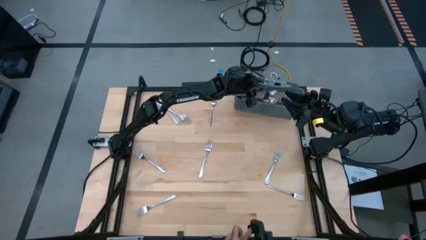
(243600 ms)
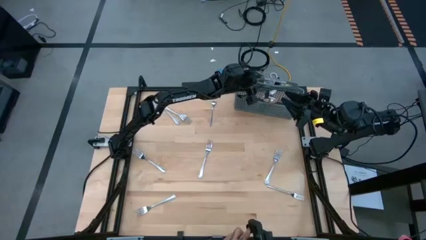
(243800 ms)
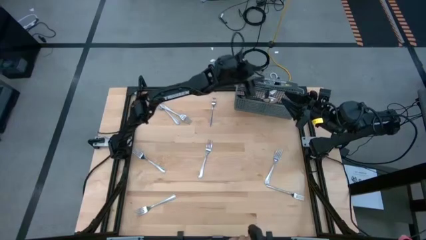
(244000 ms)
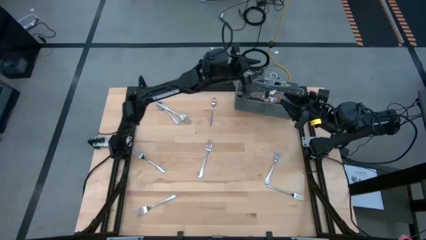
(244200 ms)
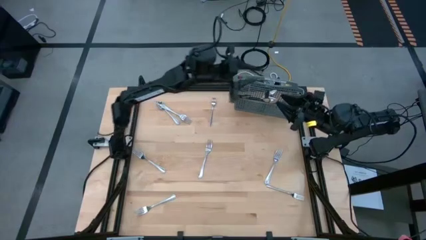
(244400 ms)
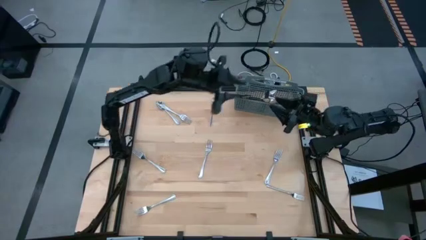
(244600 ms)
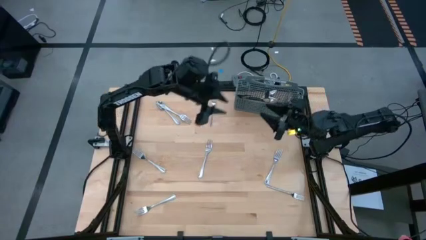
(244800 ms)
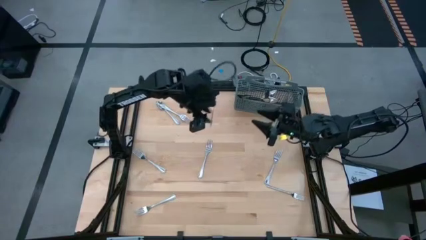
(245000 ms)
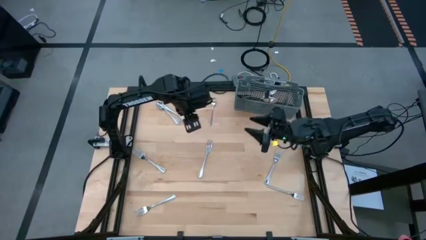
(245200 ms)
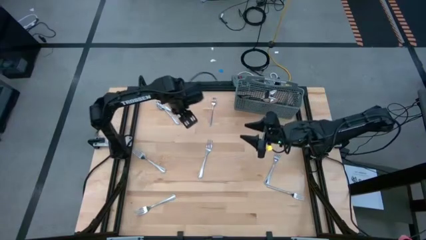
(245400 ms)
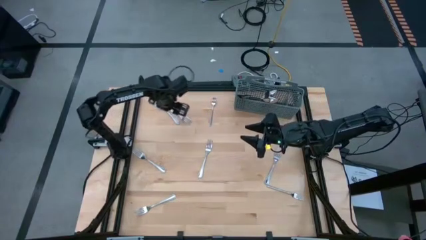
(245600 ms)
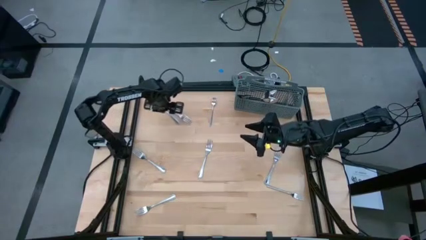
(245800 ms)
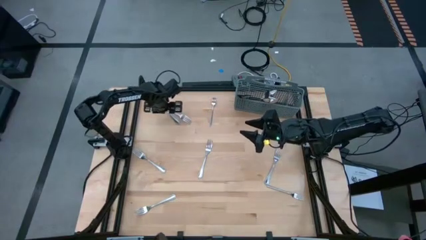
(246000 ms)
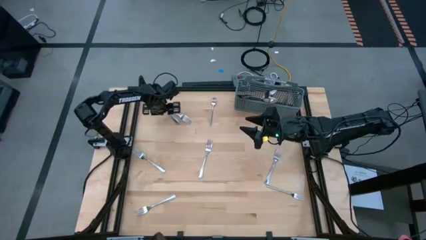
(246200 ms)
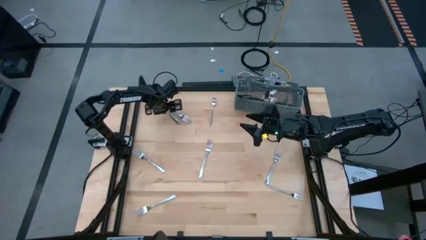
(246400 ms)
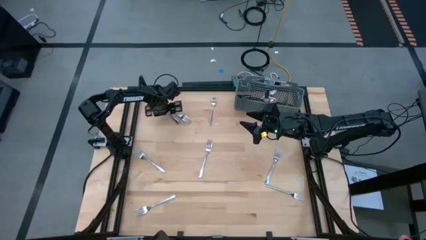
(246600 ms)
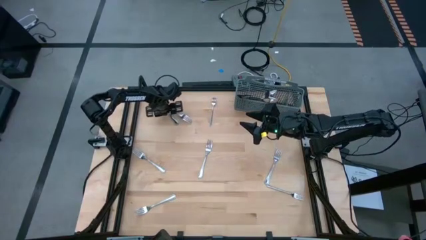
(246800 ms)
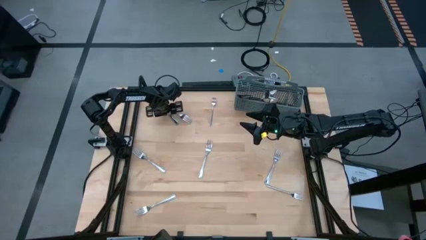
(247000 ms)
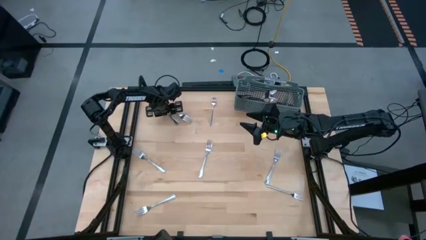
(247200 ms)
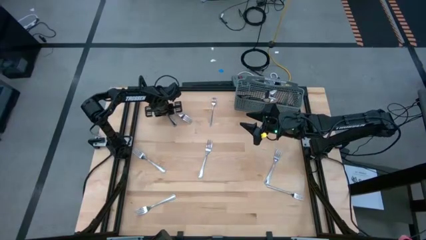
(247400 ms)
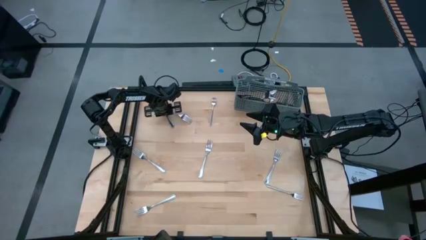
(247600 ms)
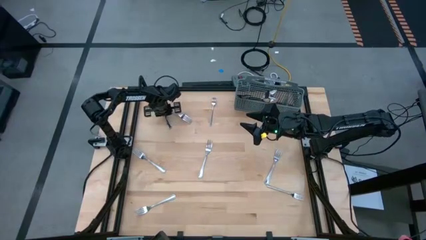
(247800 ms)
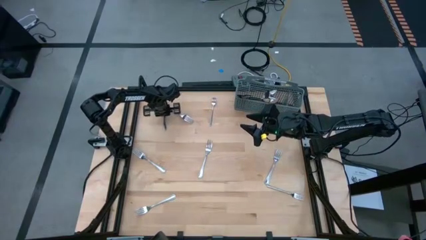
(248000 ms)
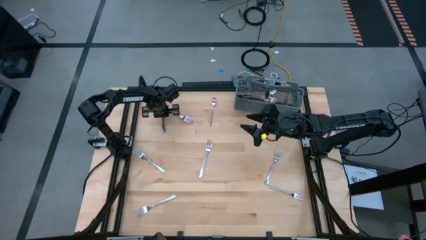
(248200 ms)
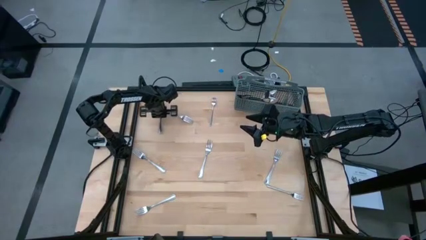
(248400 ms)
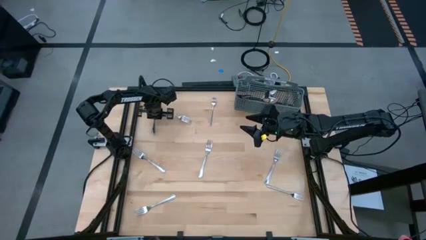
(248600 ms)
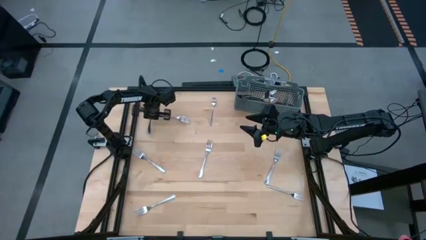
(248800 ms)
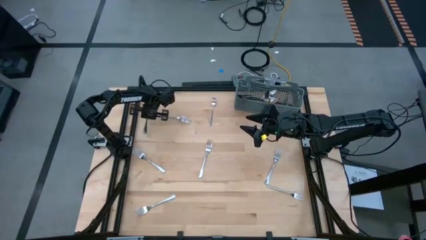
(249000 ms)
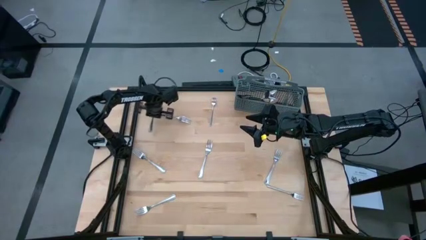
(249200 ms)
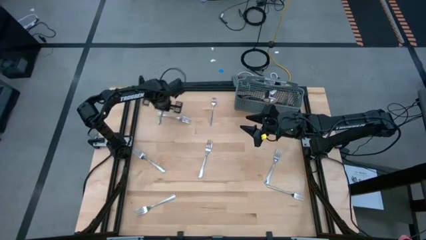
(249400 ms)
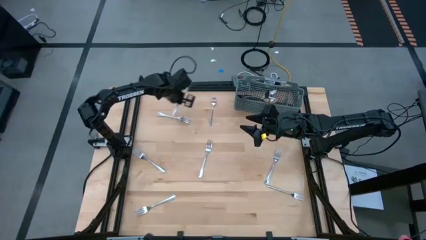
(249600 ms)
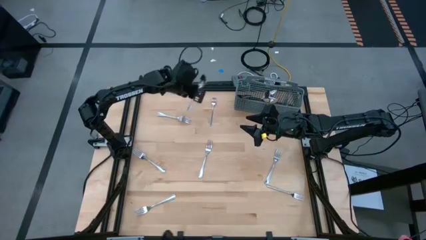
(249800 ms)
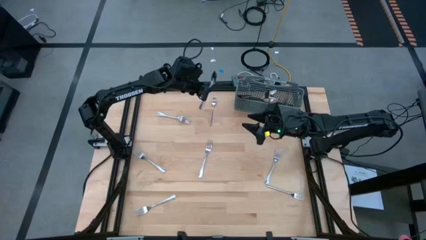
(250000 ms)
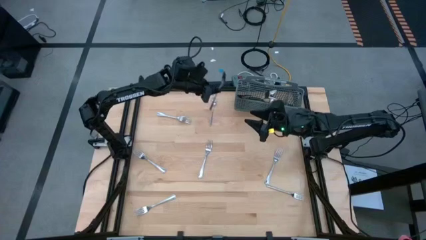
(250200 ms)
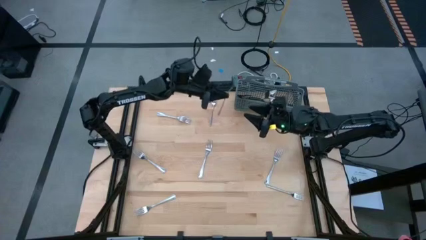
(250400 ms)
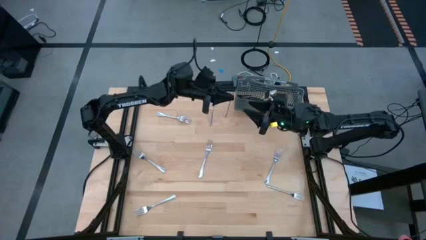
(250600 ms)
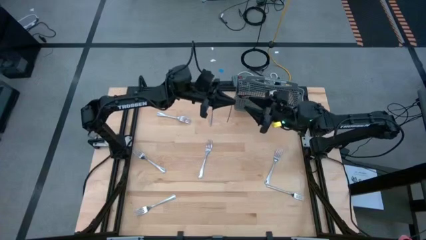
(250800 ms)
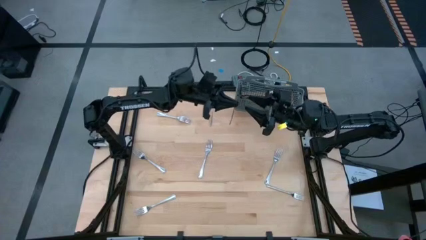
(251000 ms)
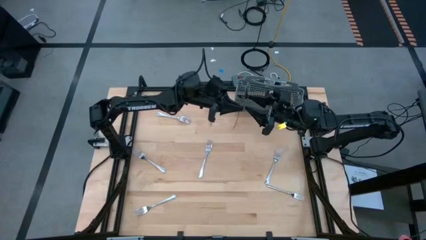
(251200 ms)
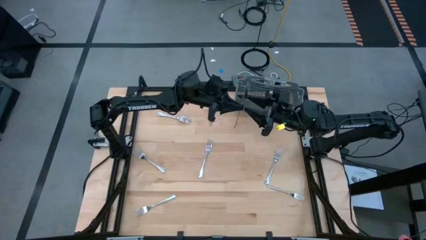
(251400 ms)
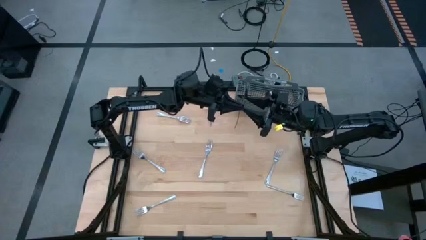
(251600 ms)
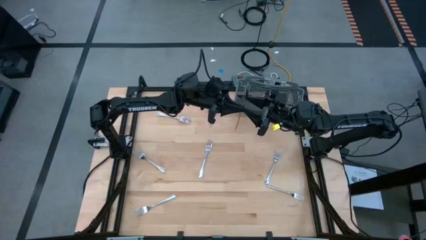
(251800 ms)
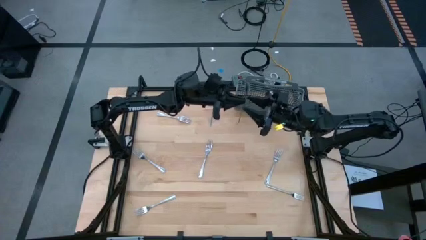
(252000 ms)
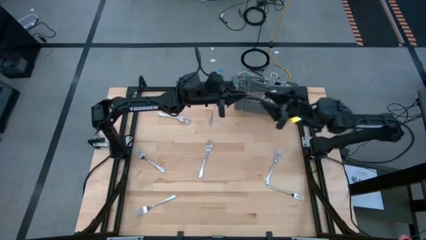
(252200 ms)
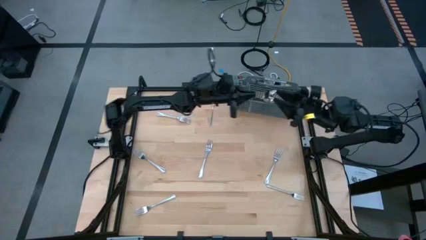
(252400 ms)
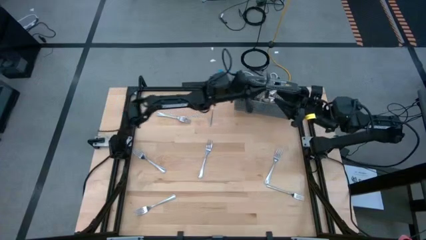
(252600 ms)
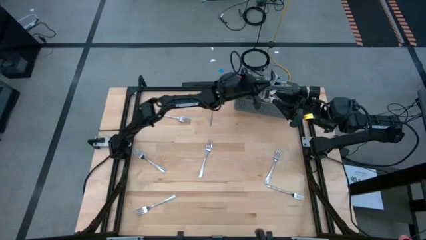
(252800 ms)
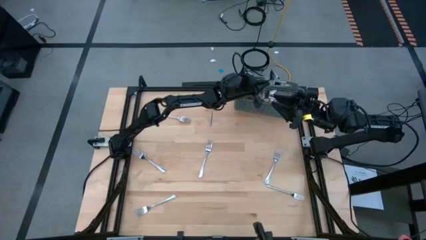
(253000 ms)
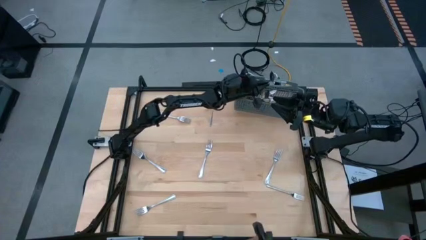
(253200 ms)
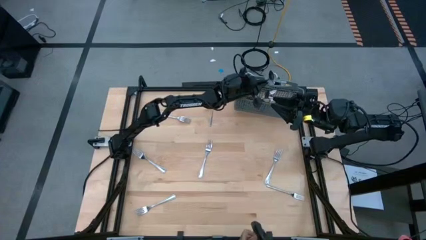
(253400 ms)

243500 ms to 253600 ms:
Task: Sort silverware
Put the silver spoon into the silverware basket

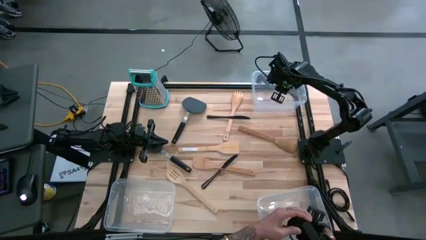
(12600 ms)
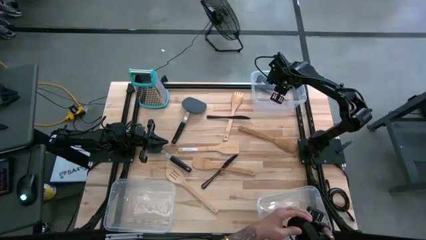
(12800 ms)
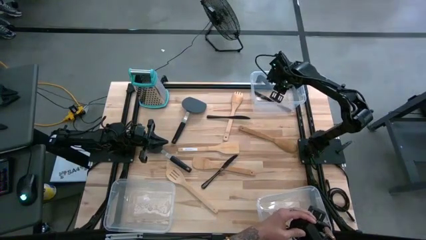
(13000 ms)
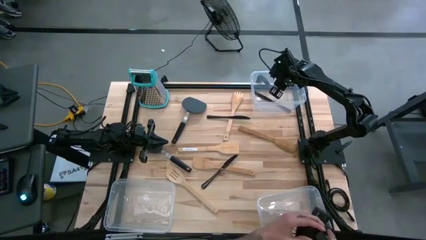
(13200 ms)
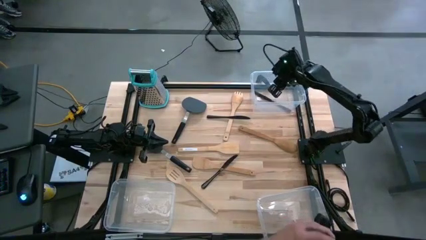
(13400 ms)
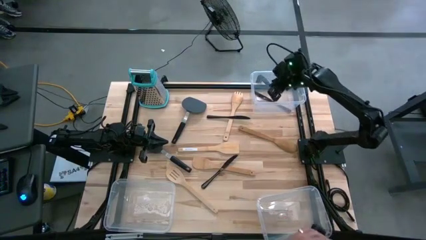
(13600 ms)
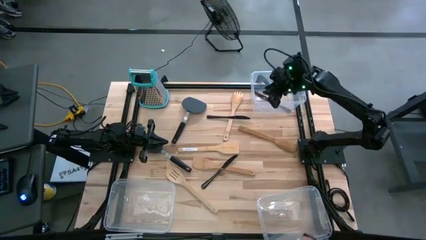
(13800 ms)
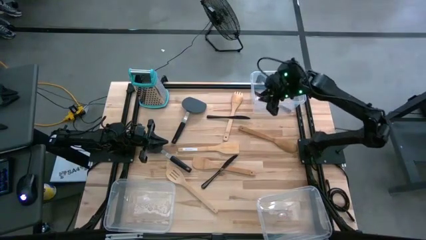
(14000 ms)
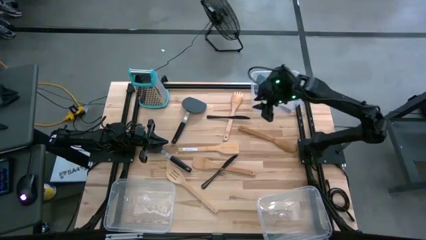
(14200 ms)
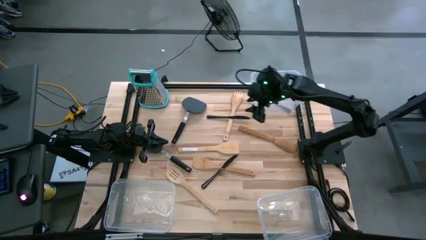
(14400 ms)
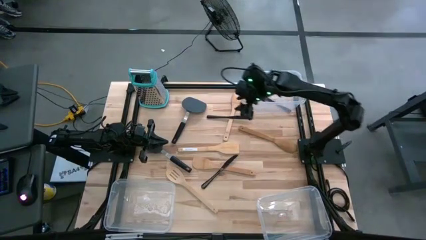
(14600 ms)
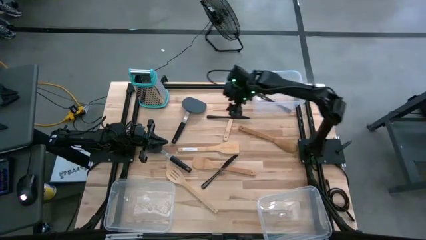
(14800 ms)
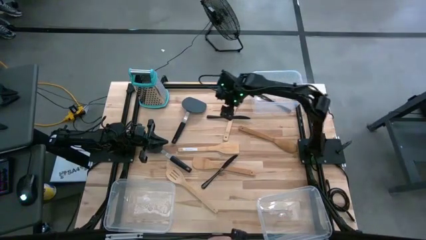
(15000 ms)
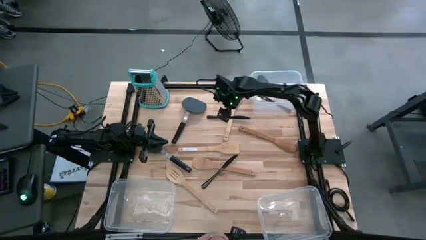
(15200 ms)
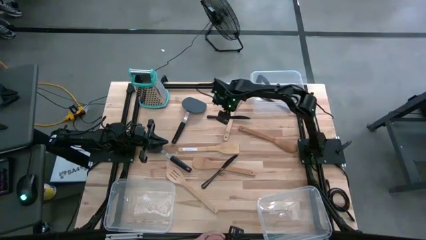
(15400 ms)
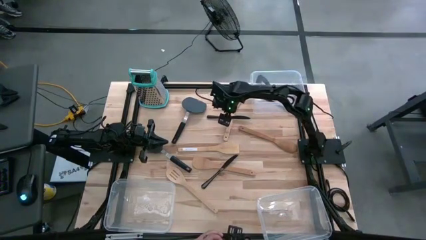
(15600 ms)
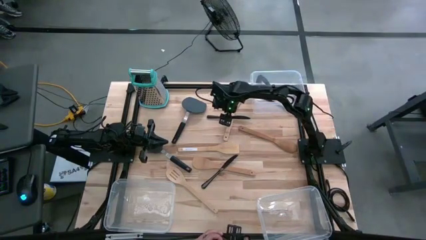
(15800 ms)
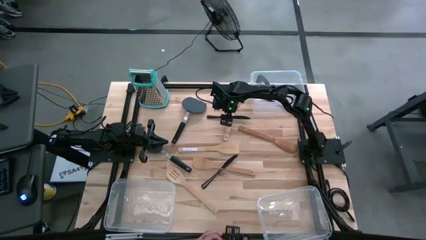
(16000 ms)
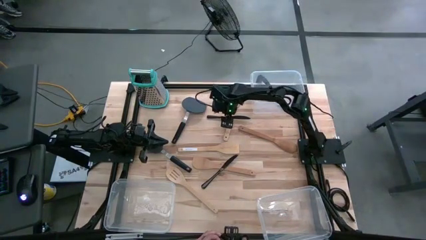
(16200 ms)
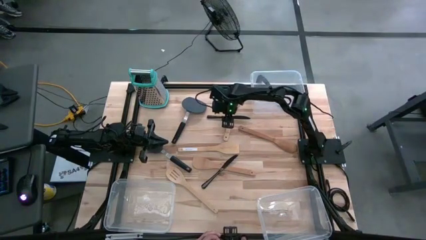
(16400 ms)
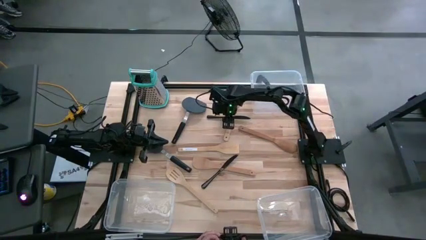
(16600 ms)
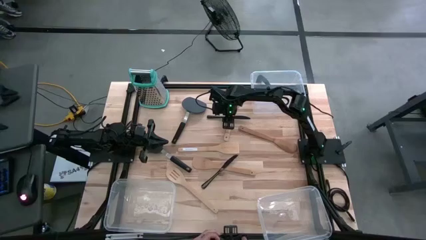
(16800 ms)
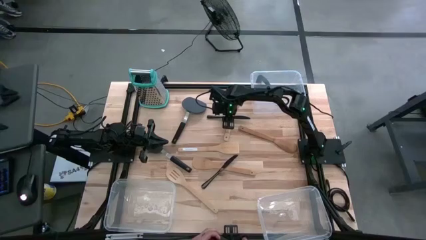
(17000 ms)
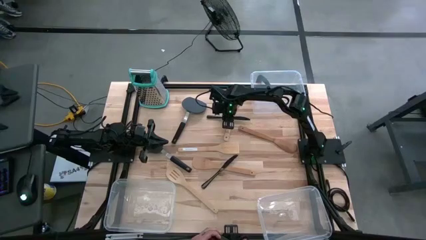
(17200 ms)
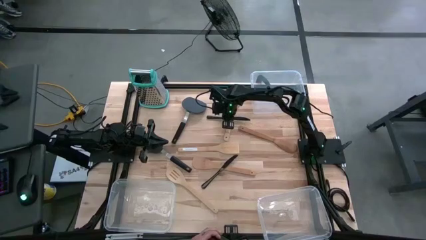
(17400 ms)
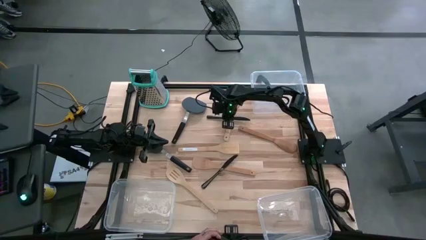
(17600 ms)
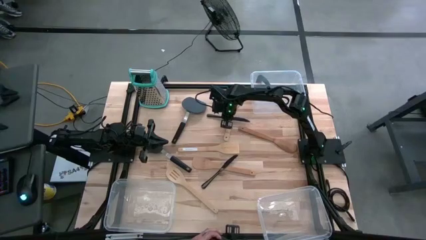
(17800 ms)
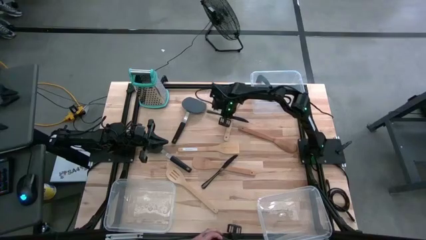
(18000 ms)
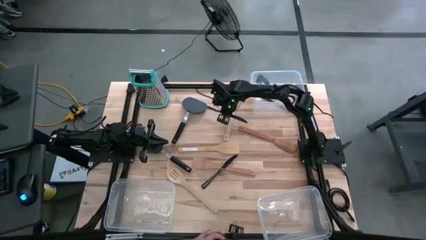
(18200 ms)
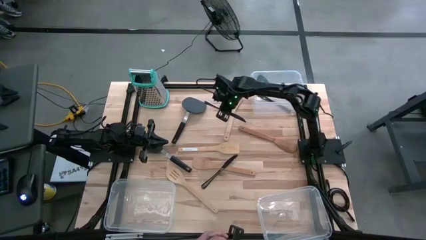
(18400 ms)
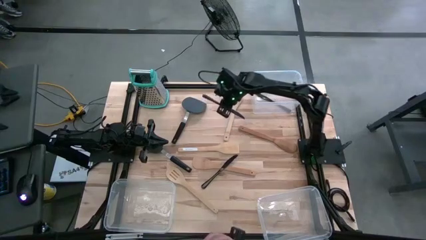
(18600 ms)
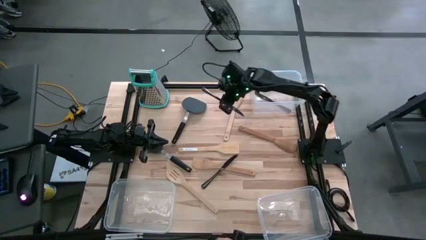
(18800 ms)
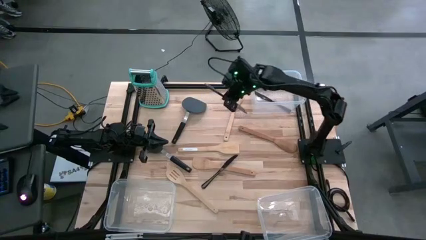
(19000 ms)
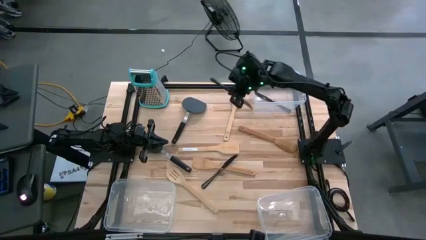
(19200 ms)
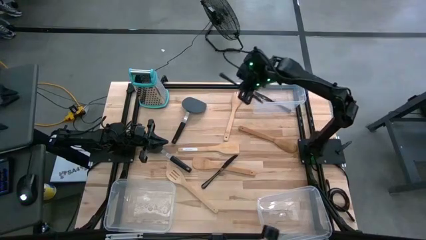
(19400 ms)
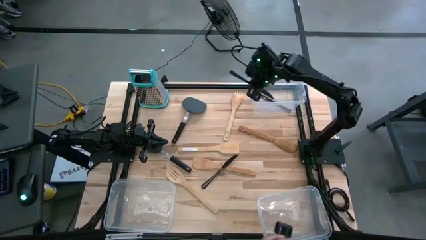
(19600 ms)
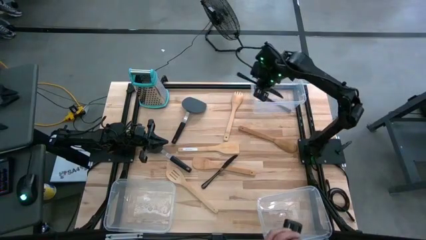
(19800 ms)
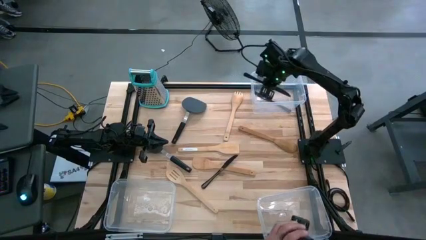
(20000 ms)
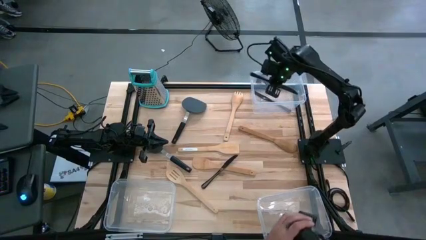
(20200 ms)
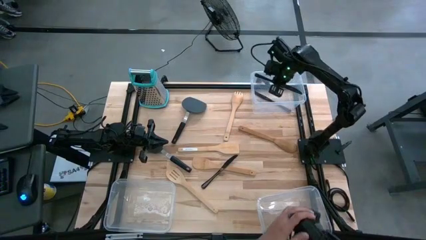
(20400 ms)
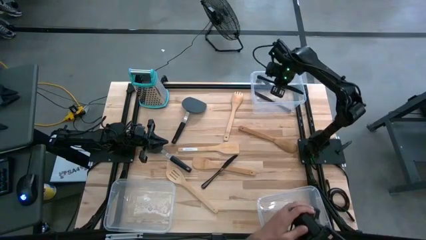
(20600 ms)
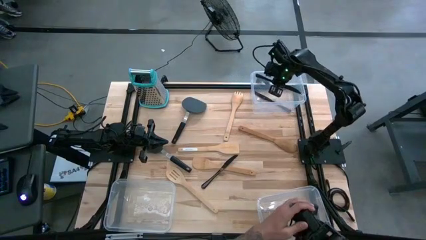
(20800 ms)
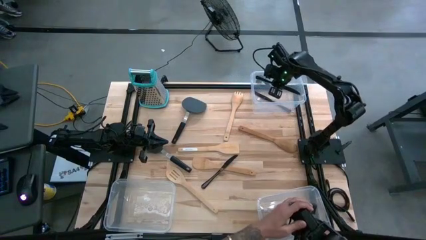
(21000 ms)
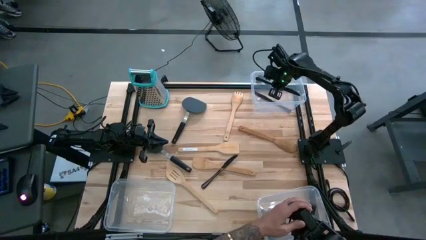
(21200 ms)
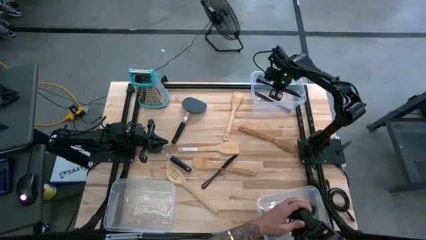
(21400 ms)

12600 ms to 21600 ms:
Task: Pick & Place Kitchen Items
Put the top black knife into the top right transparent bin
